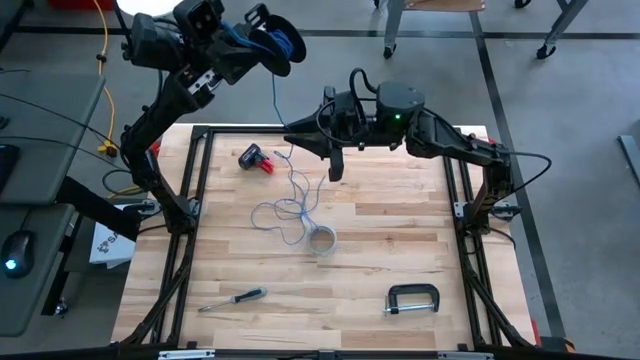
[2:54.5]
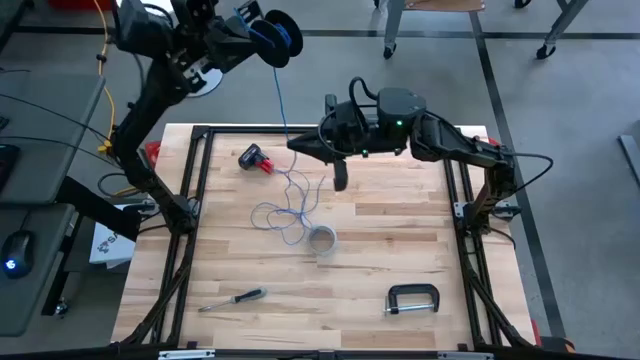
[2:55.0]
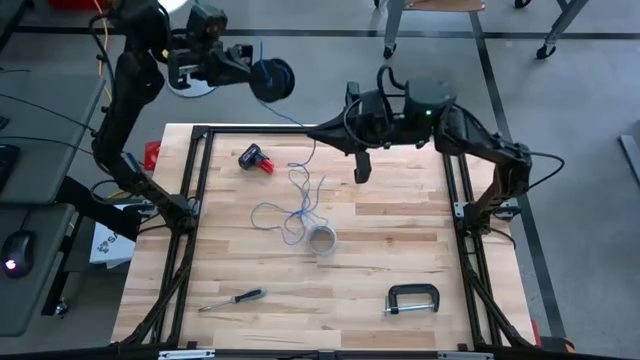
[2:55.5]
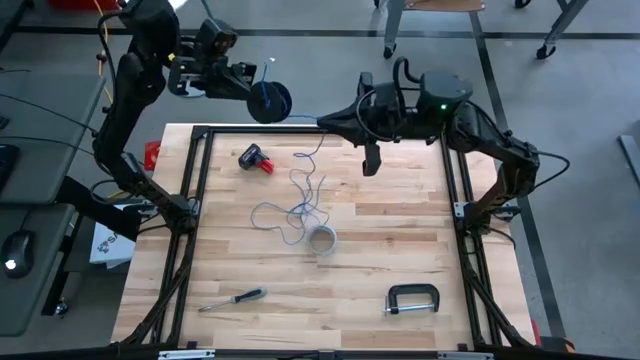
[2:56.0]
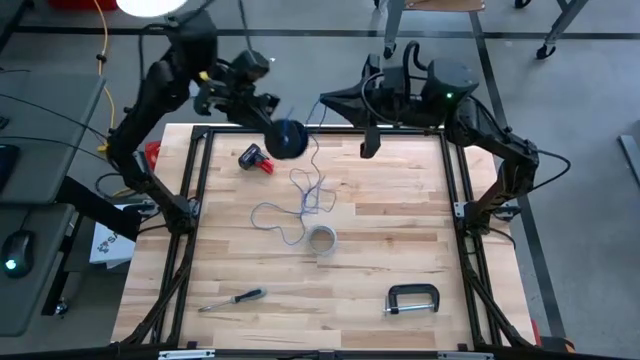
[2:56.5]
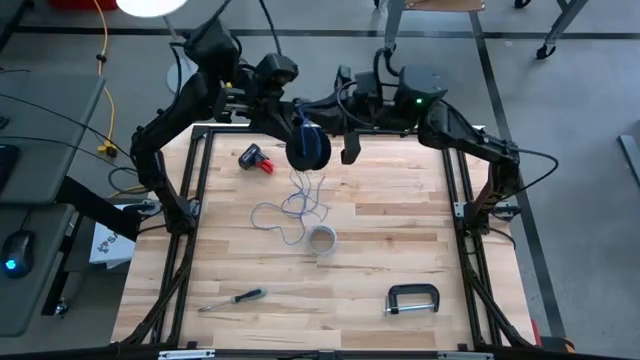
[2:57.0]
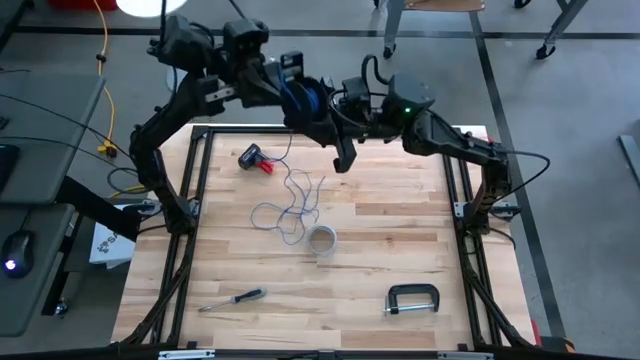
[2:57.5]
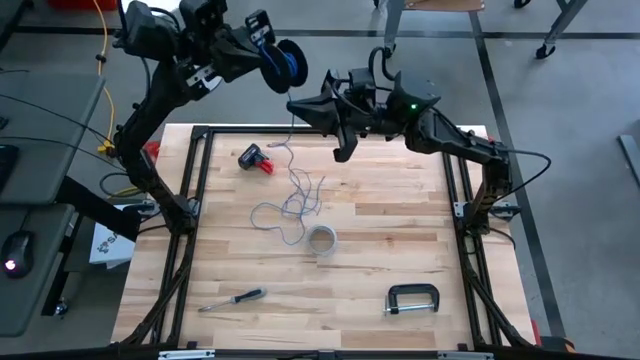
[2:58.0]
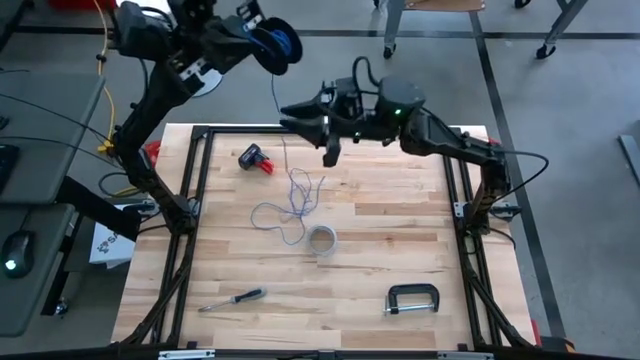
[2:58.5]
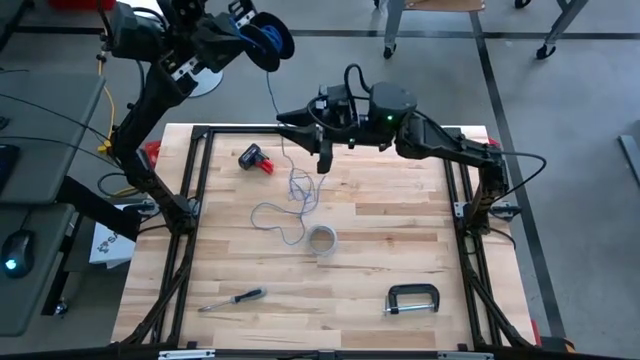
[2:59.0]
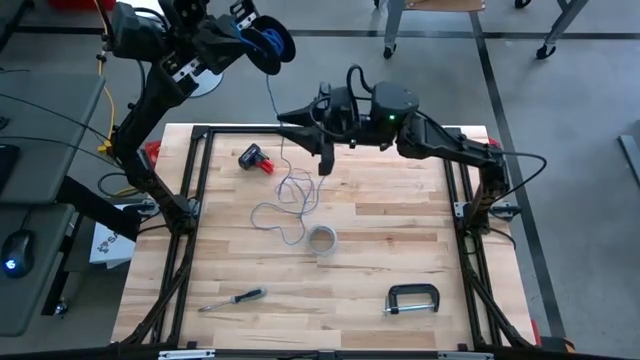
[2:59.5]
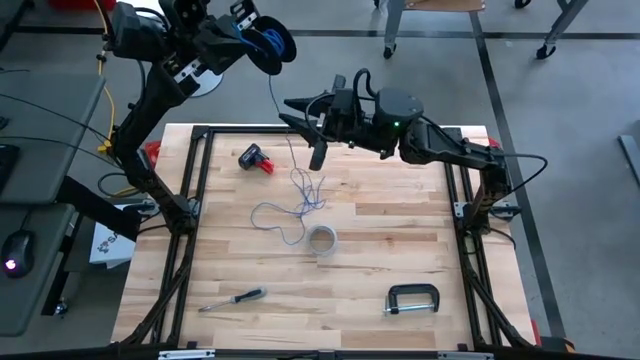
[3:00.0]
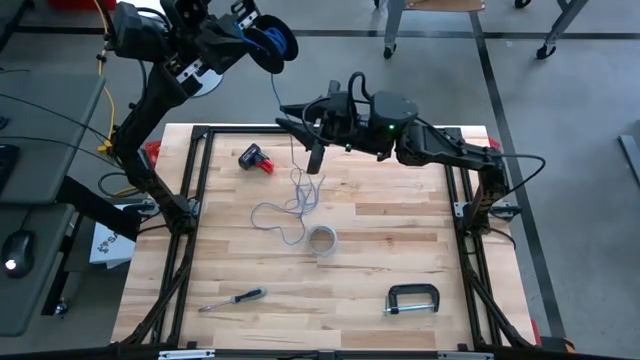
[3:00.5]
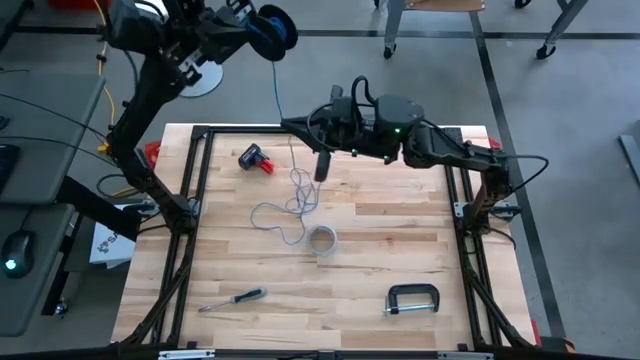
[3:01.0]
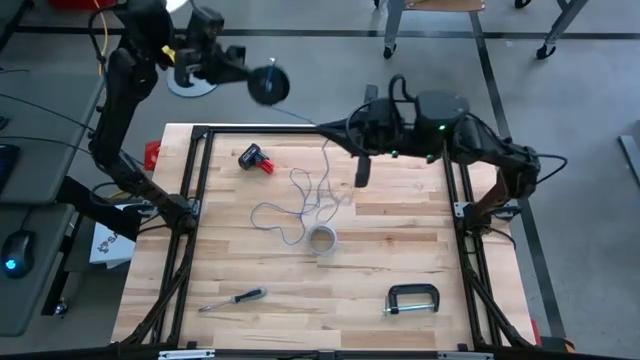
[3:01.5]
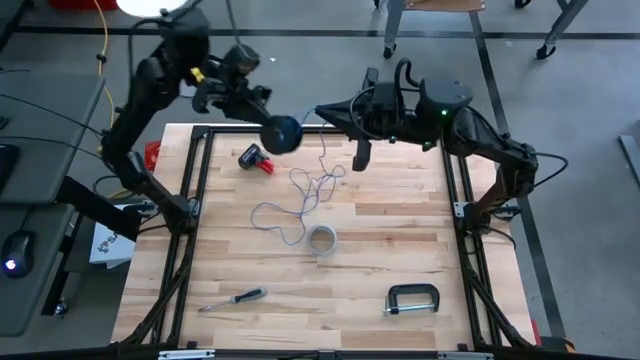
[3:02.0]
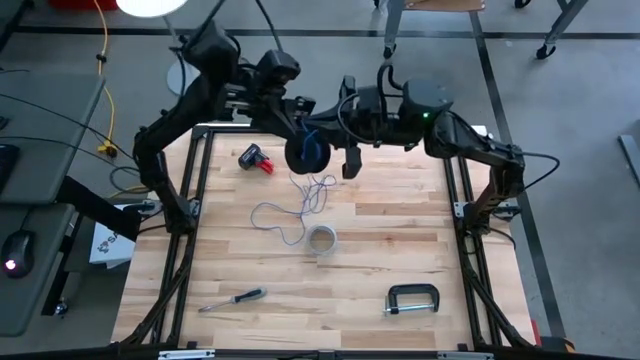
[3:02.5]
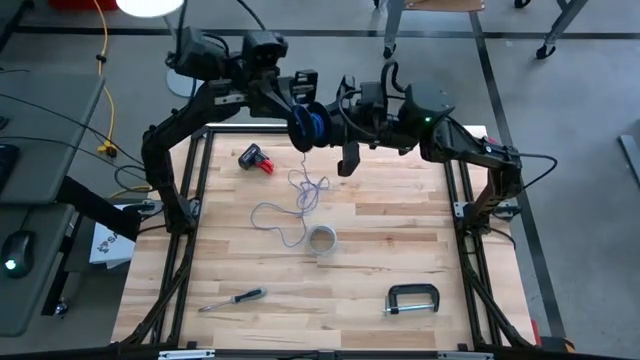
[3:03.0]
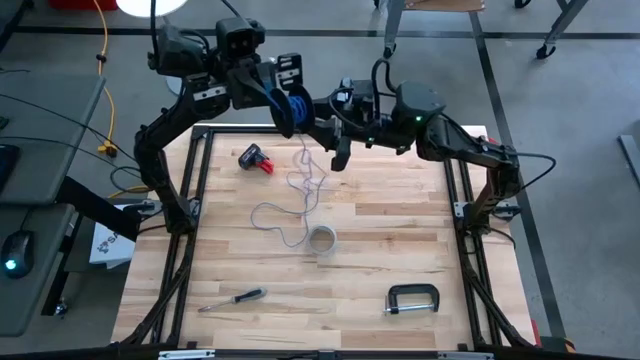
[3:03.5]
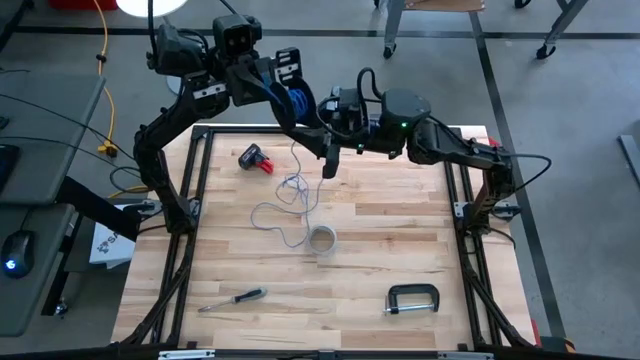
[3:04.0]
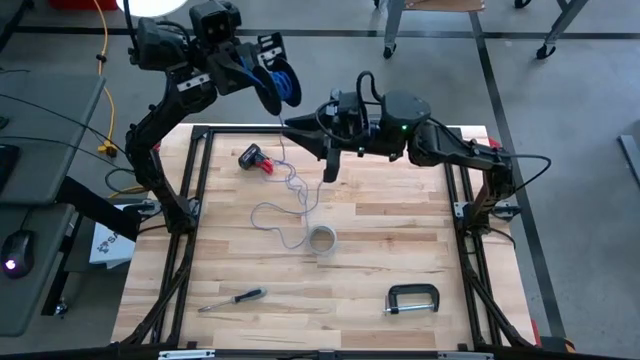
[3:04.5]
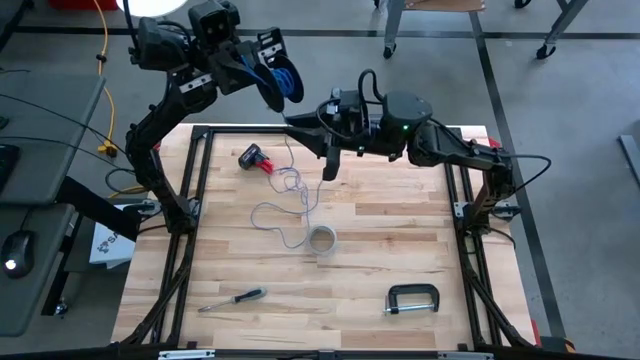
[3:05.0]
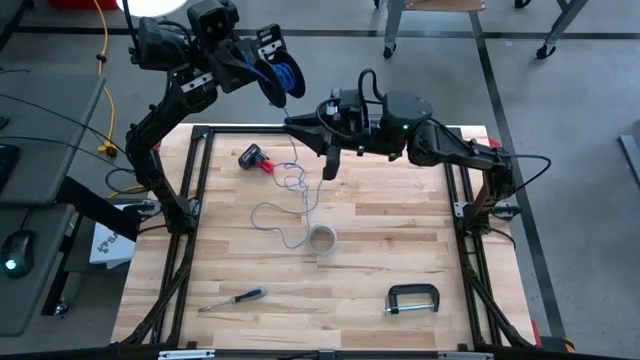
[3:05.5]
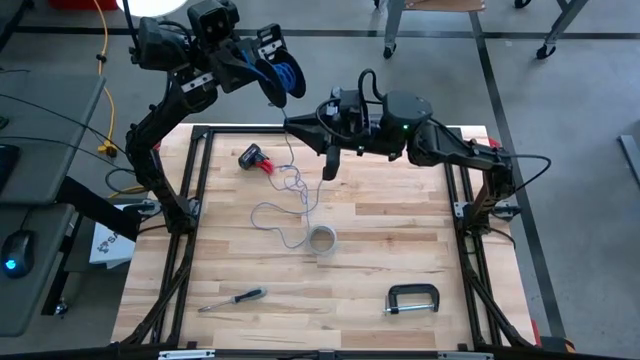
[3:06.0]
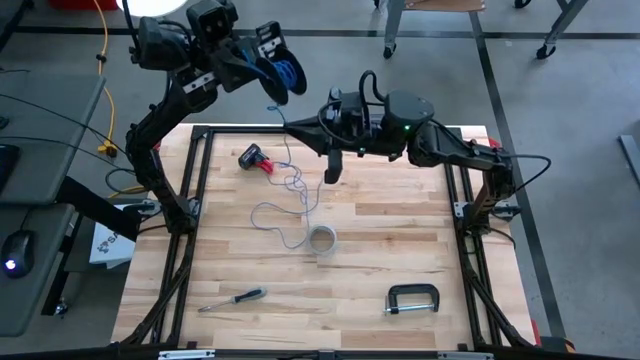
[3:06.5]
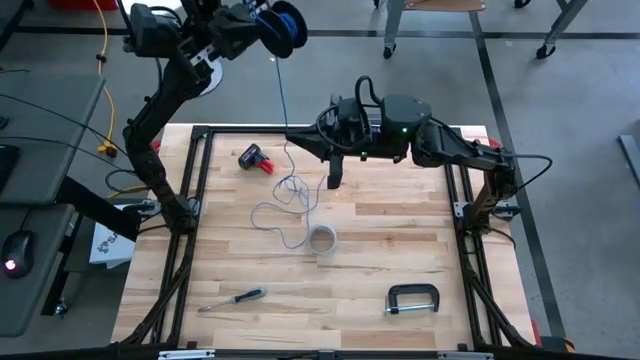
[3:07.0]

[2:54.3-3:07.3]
Task: Coil cords
Coil the blue wire on the spool

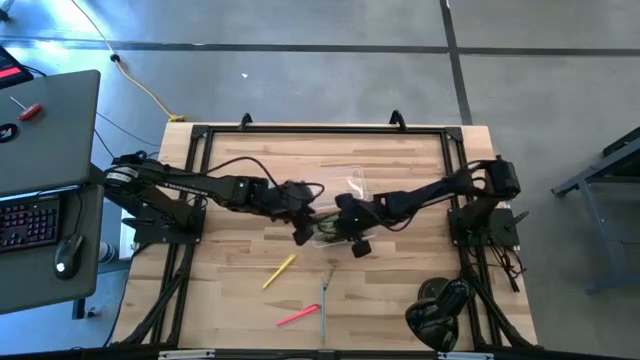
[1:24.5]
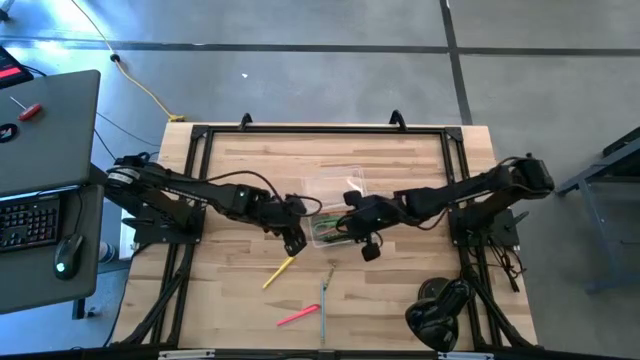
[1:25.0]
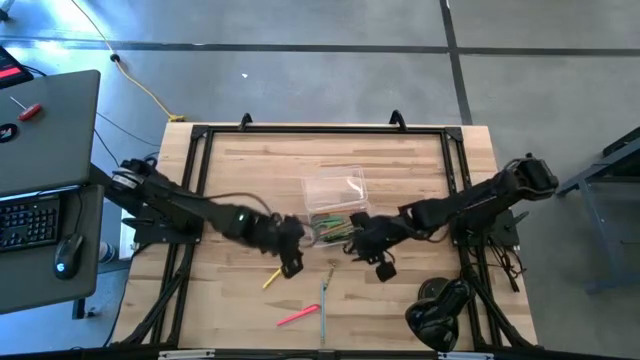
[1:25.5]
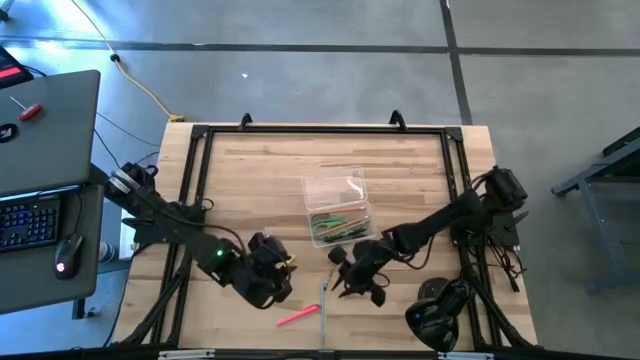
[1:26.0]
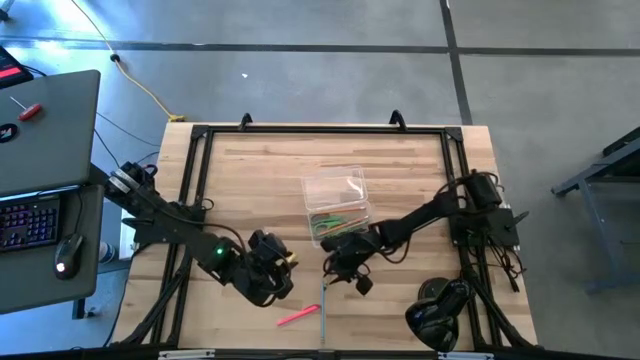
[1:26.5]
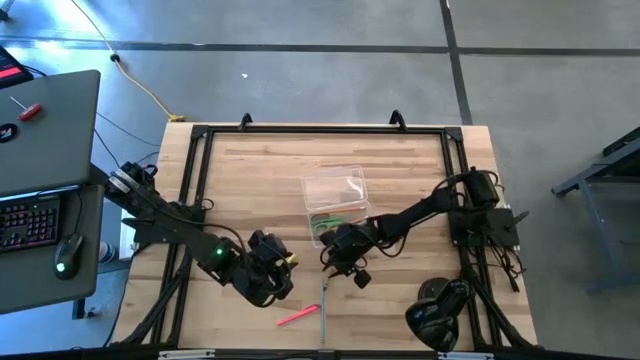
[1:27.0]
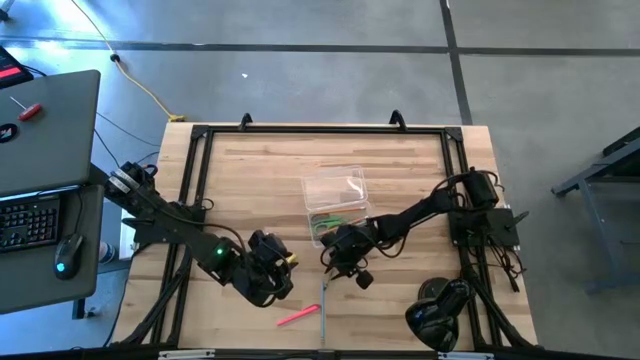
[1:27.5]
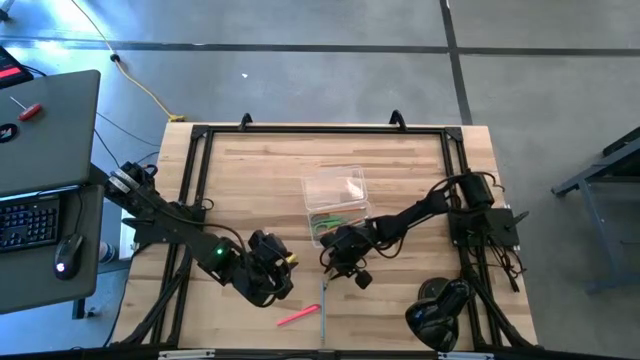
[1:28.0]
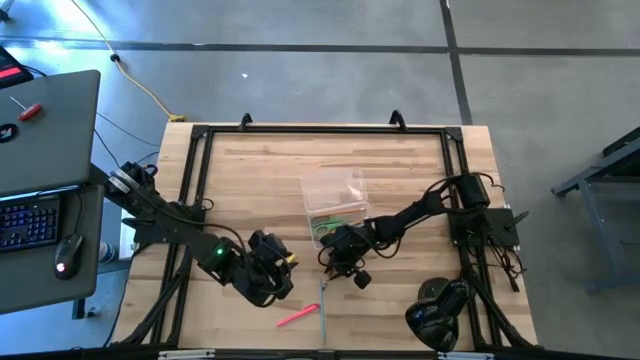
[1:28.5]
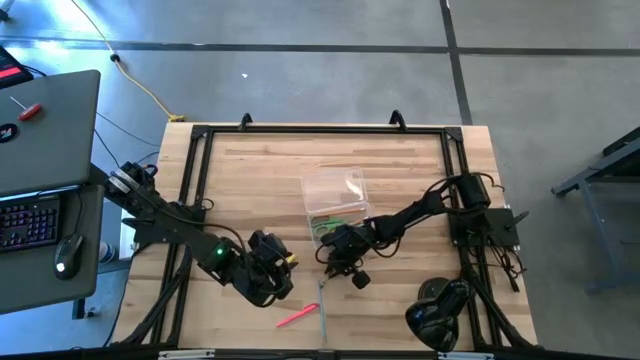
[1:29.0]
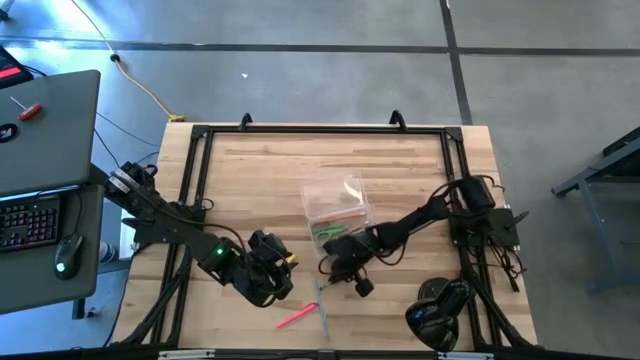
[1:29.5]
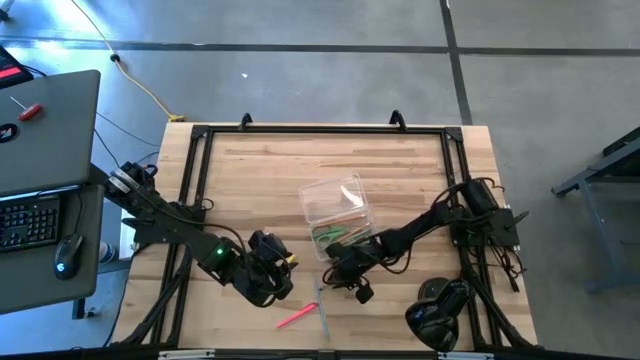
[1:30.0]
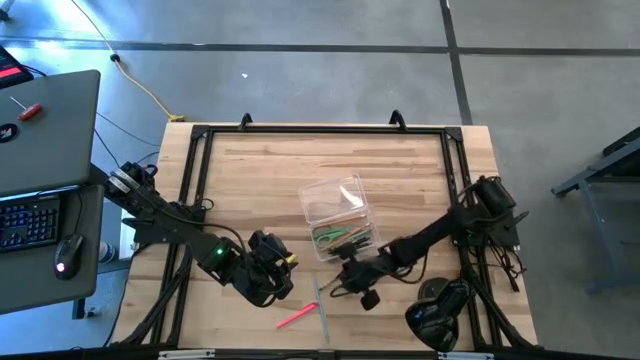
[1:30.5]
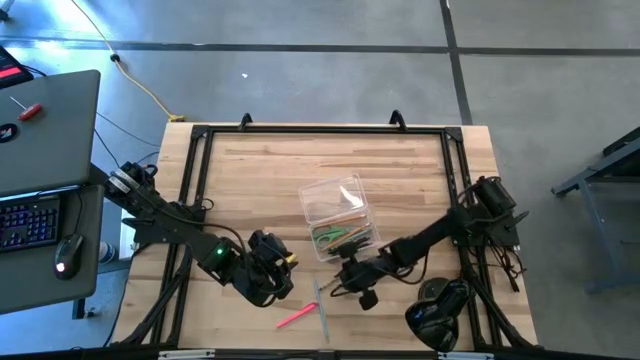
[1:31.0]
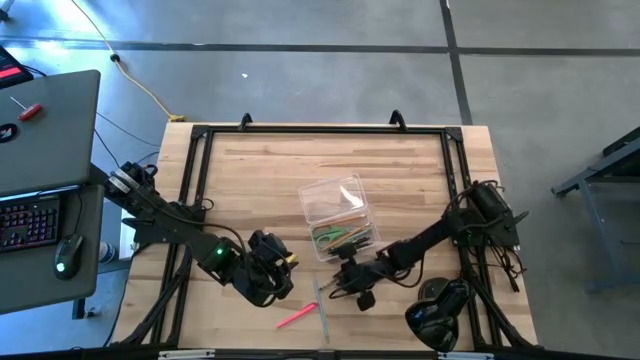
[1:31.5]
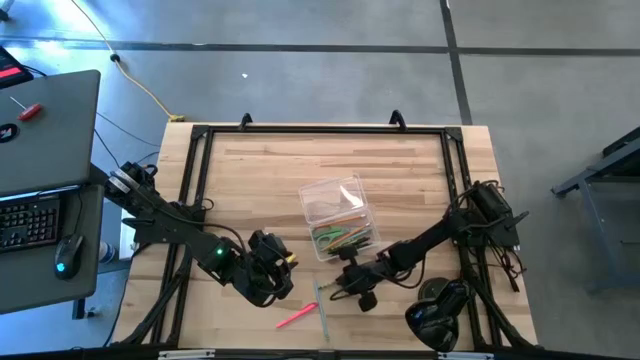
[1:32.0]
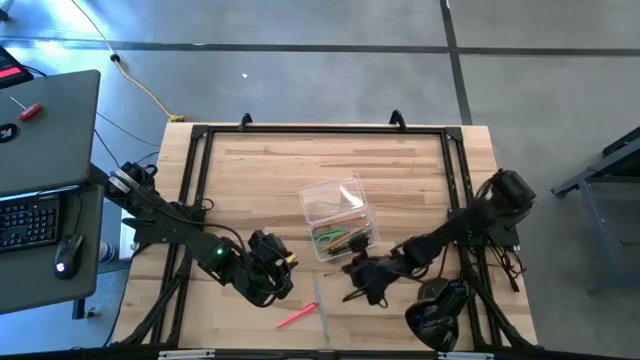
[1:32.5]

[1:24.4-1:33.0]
Task: Pick & place school supplies into a supply box
Put the green crayon into the supply box
